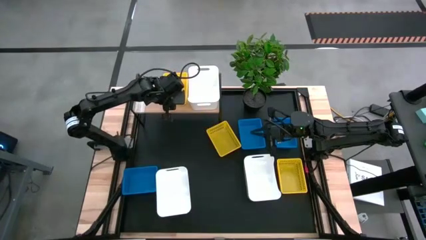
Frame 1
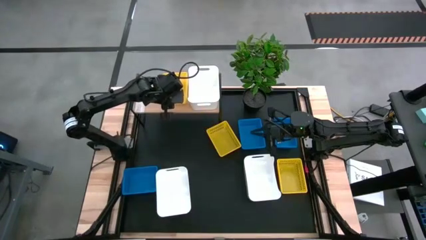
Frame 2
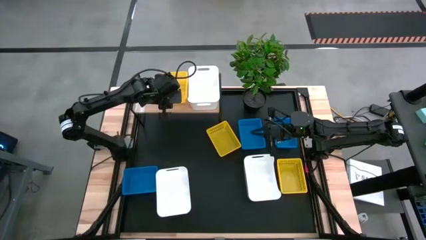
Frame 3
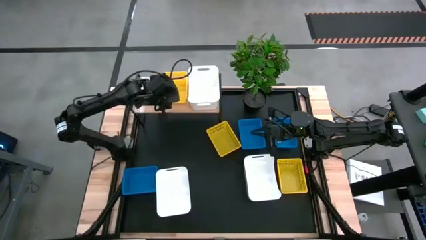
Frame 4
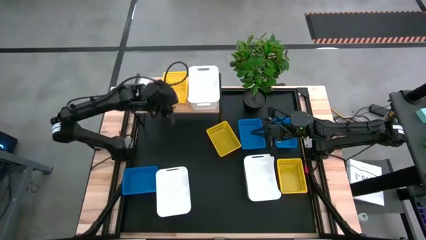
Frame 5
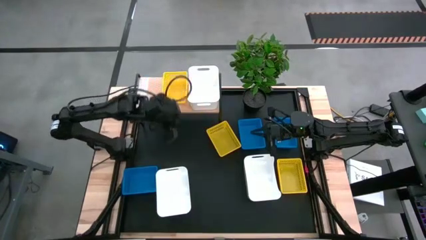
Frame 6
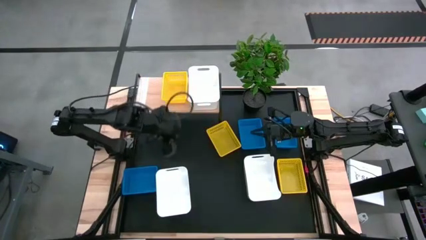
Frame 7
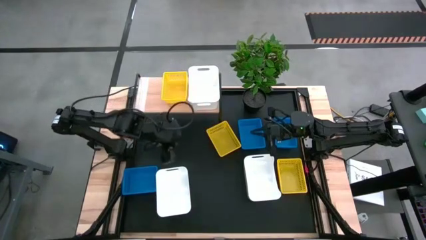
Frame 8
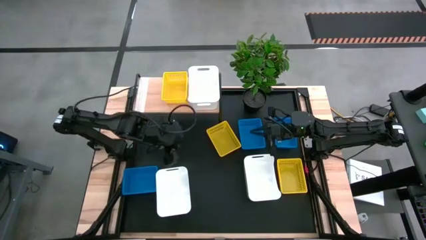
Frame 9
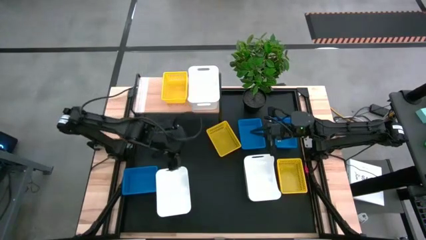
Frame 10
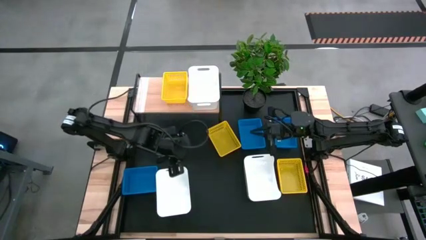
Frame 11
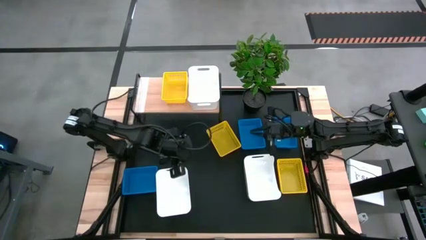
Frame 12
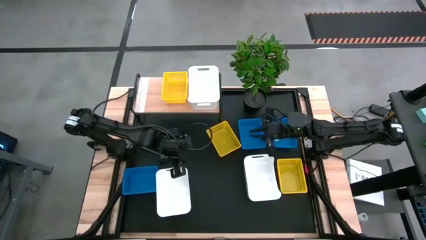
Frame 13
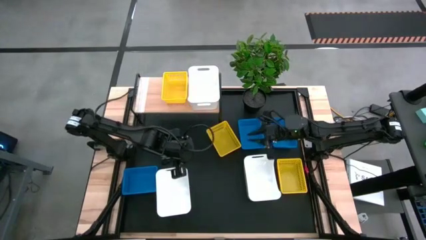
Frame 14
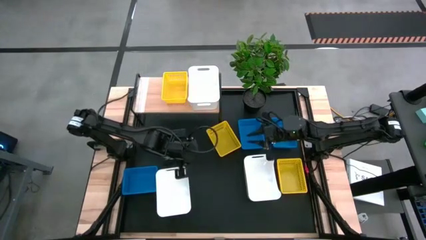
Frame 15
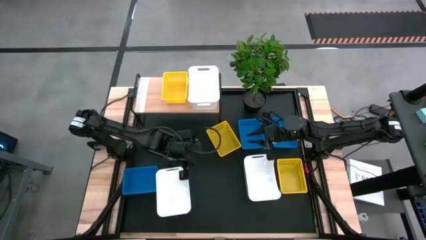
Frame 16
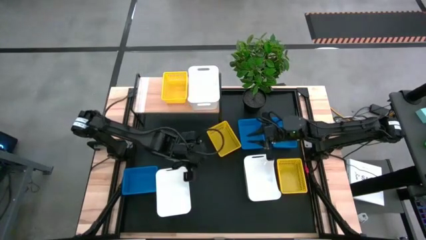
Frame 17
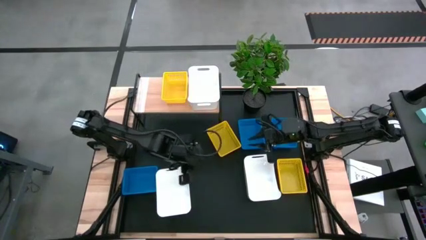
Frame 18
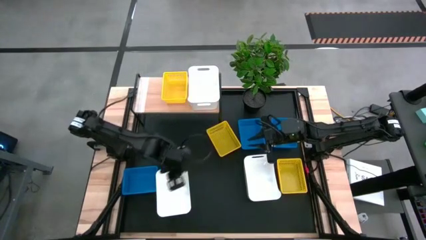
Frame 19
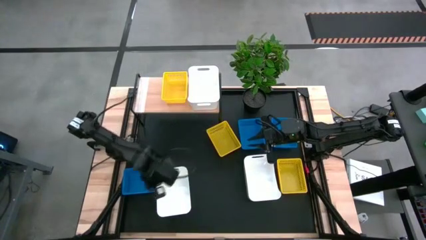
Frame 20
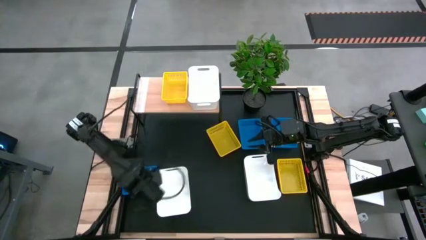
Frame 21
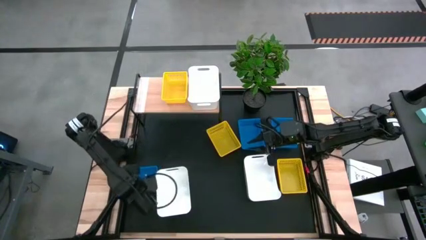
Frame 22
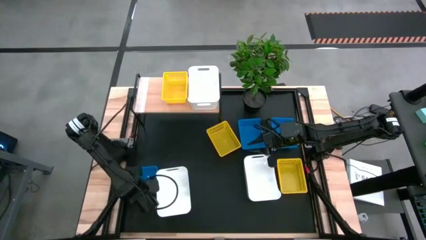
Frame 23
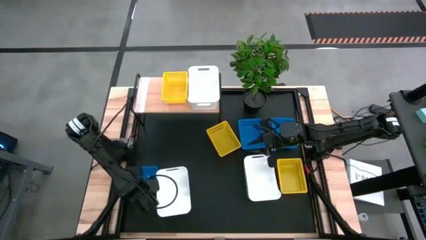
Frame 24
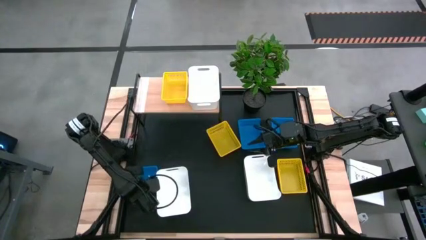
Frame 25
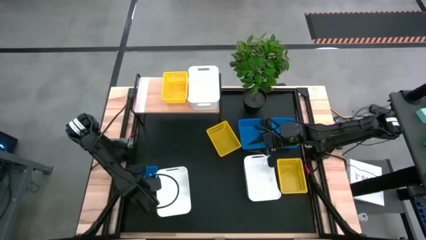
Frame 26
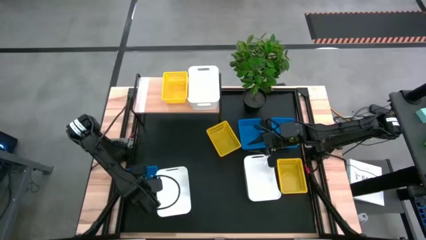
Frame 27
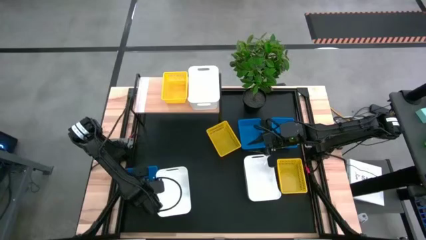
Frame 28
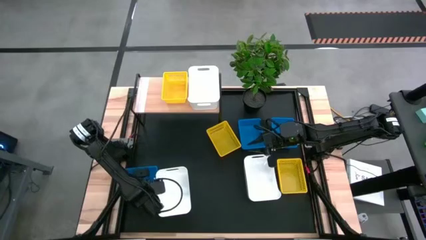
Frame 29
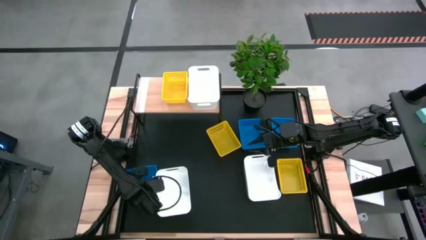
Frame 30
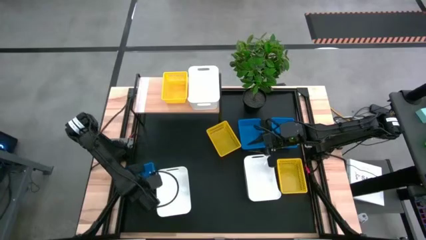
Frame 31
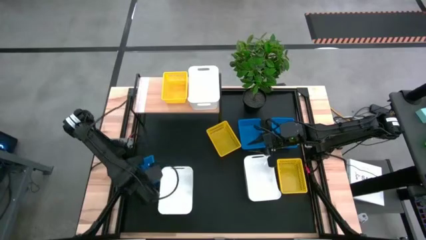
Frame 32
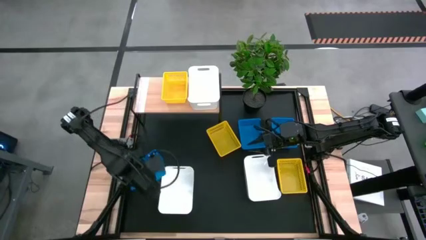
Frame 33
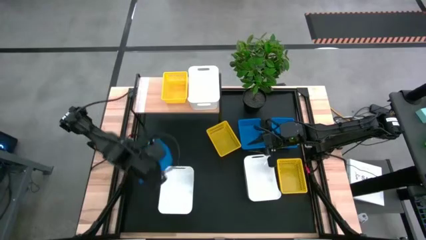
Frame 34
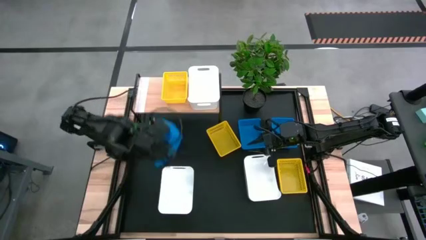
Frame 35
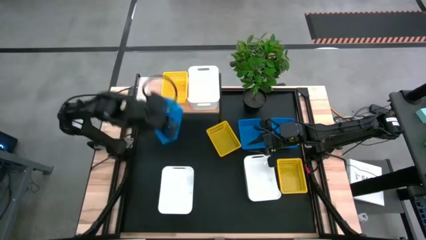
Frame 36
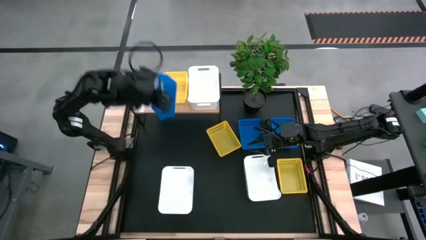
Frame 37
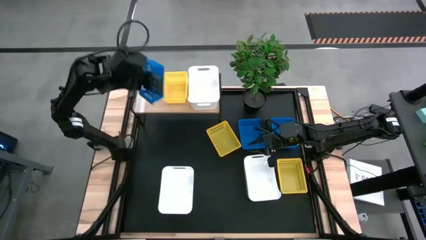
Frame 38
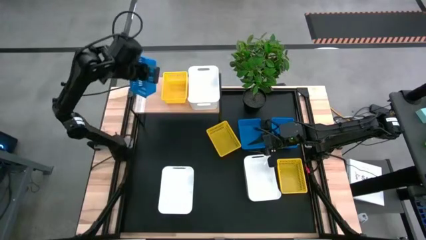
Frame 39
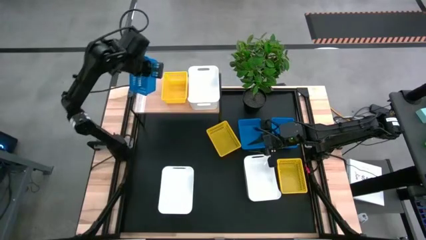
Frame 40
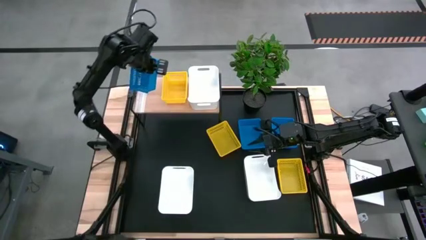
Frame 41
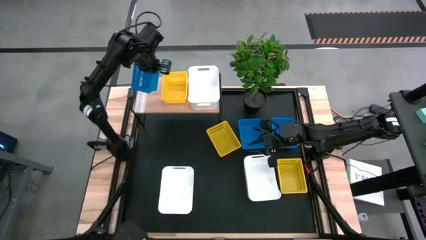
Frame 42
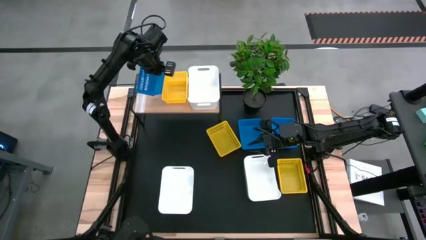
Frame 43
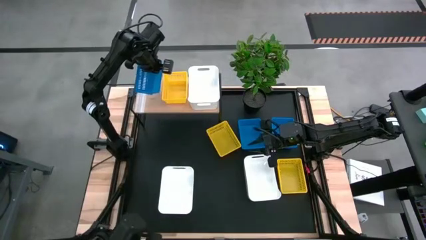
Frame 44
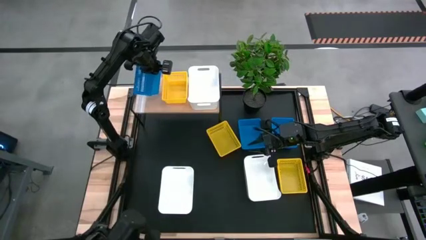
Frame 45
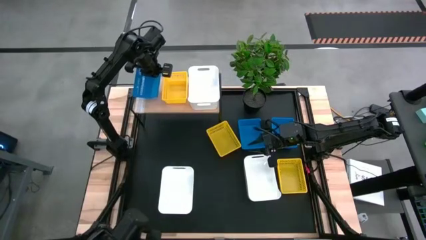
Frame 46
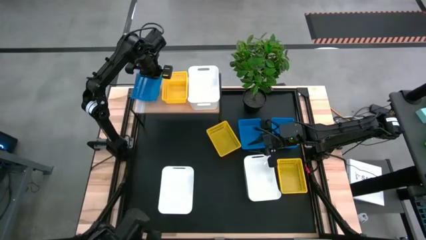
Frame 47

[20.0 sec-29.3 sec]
Task: Stack baskets on shelf by color
Put the bottom left blue bin on the shelf

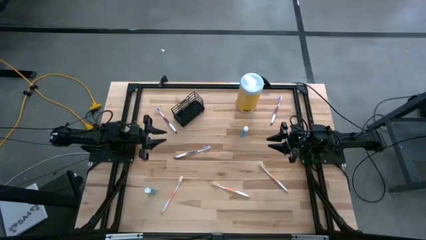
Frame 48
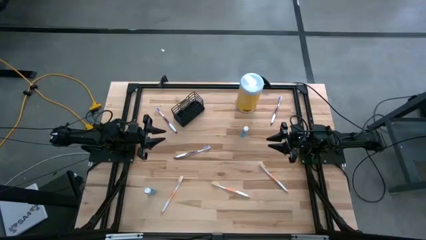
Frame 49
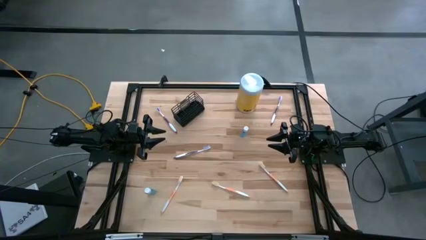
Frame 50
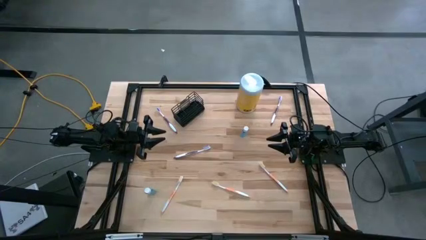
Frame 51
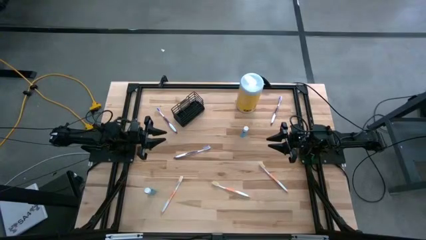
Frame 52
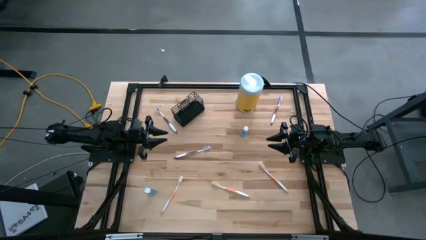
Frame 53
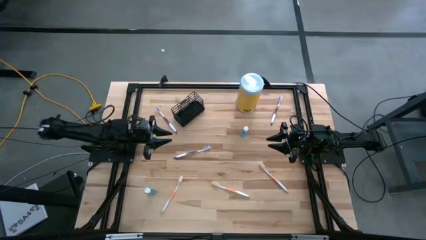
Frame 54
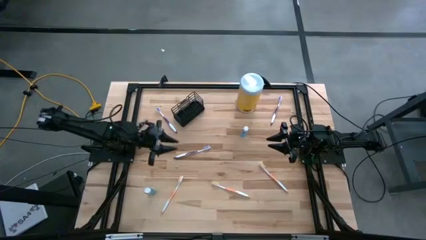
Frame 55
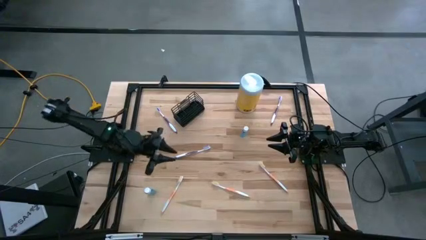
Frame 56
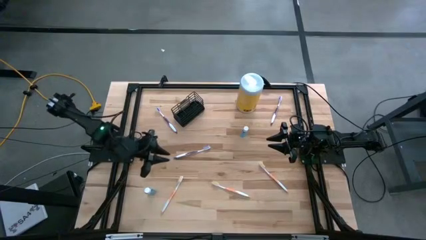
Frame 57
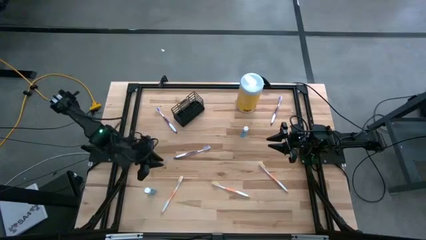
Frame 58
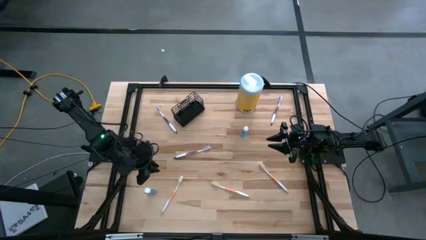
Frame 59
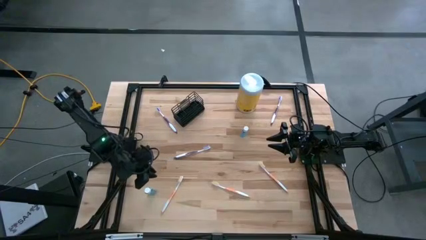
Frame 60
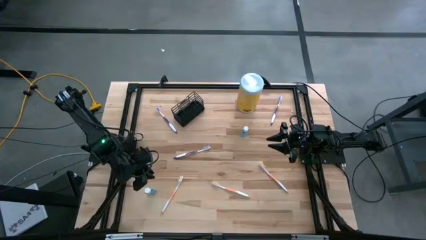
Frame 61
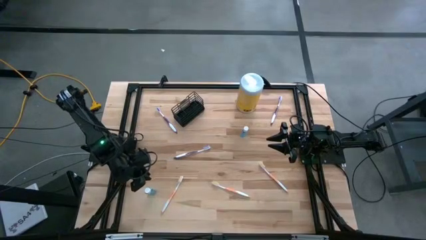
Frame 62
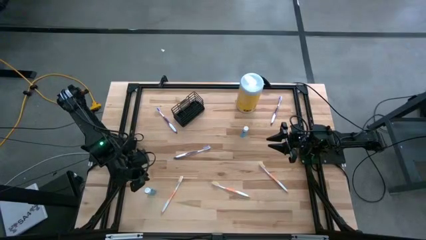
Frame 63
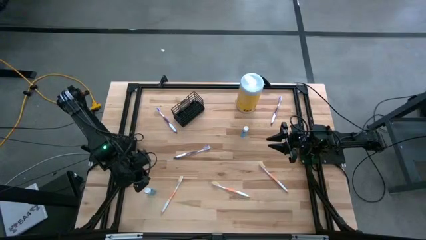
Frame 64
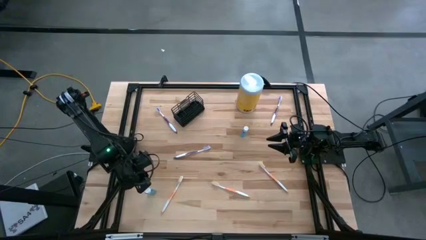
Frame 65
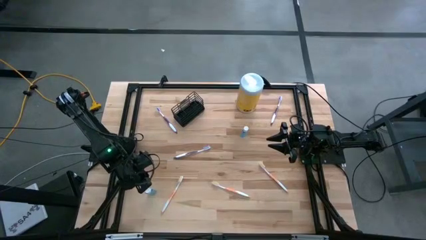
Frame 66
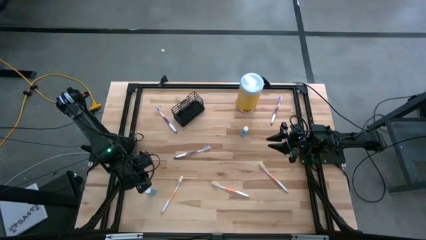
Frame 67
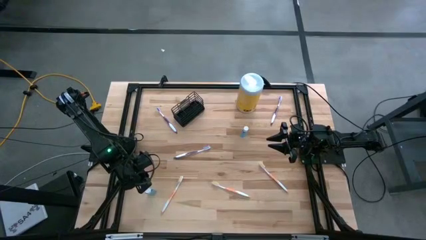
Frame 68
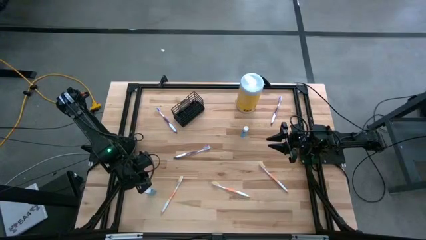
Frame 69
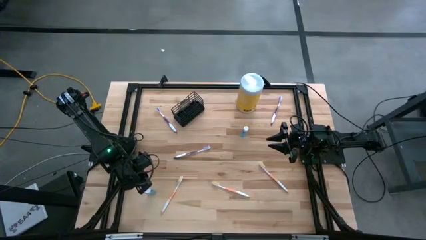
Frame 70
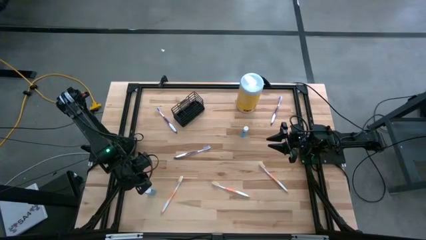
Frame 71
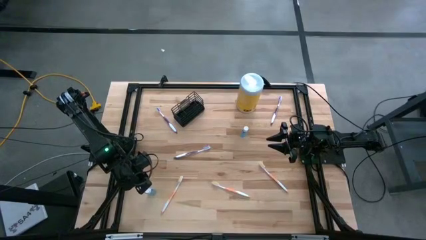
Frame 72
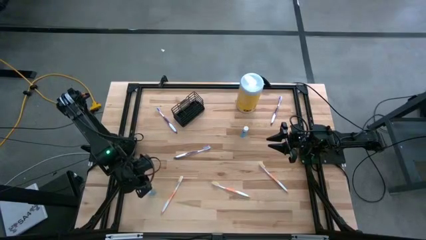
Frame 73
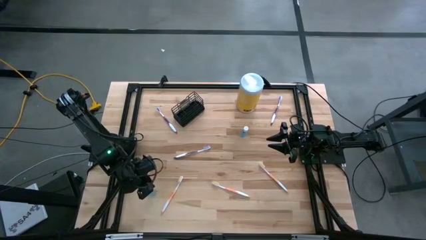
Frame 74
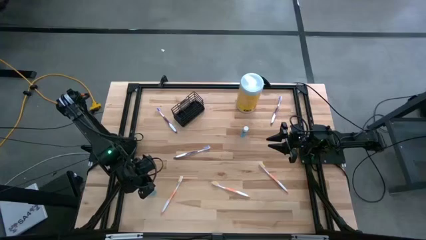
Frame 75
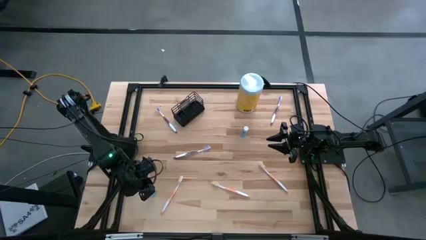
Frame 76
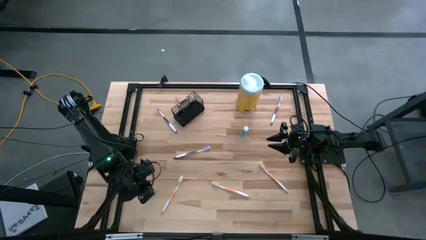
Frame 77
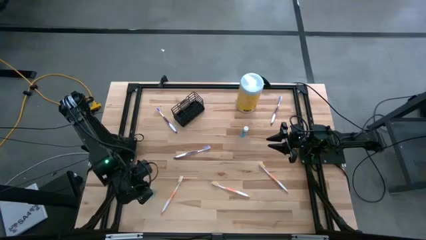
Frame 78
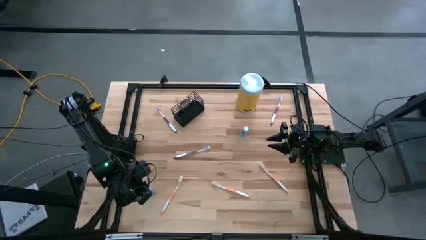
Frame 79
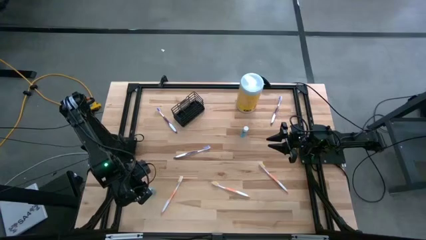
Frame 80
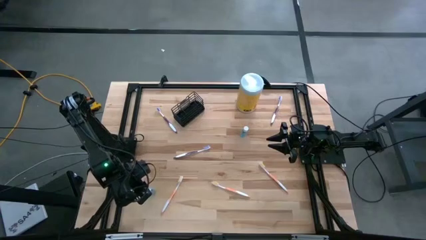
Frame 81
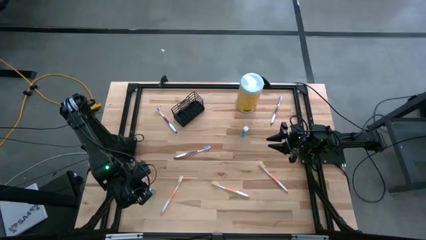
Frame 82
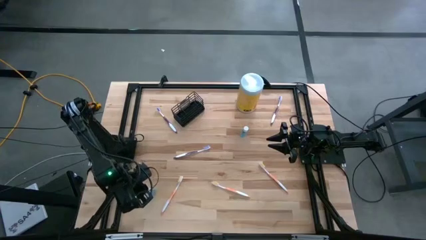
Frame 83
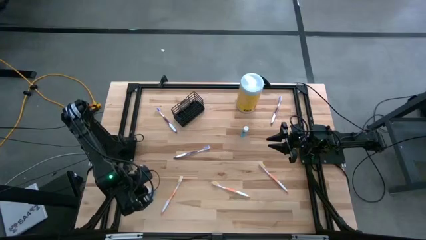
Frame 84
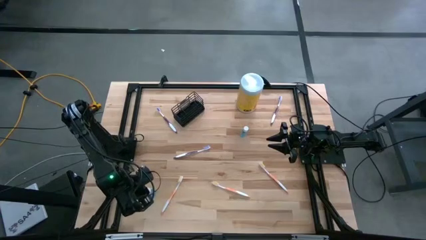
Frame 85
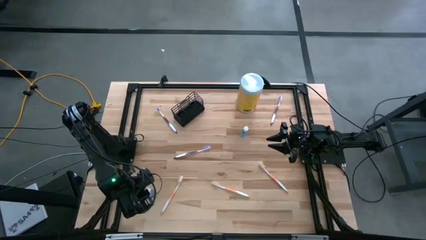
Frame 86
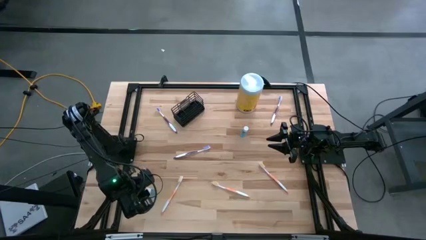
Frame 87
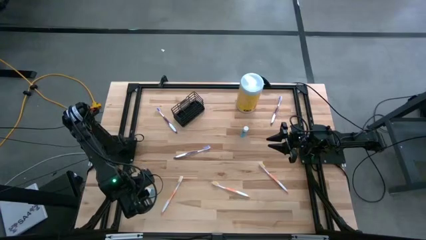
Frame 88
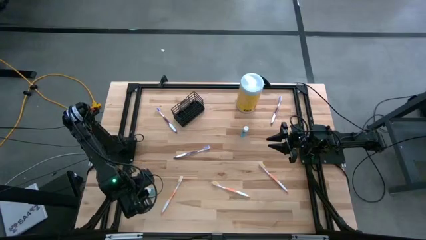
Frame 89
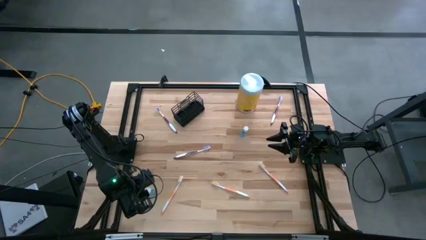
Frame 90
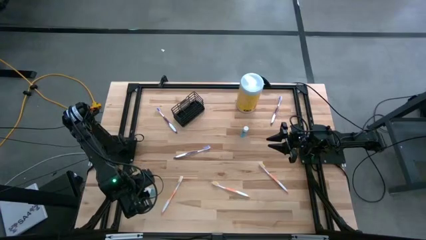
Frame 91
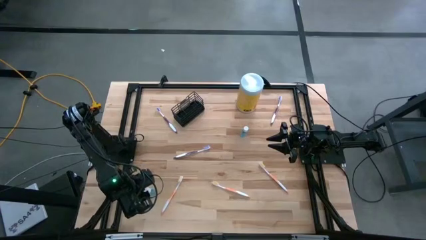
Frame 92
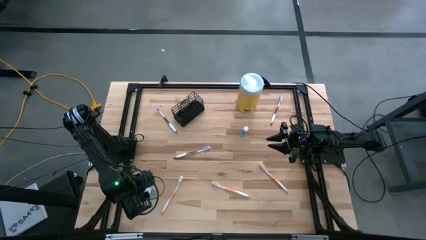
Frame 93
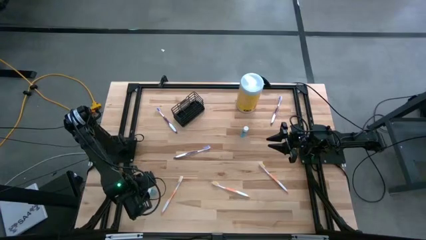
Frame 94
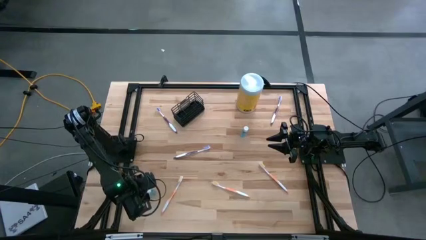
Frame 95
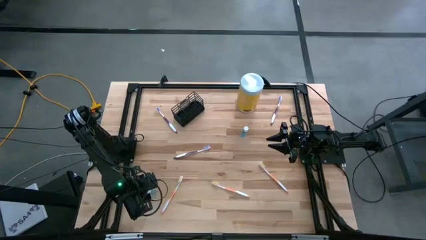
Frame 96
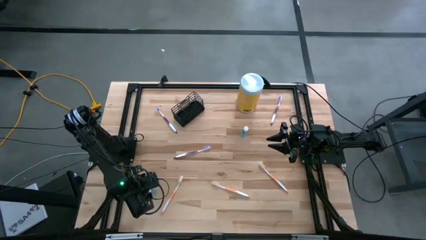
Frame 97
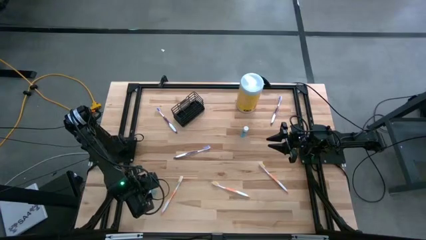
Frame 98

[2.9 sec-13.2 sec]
Task: Pick & Place toothbrushing station
Put the left mouthwash into the middle section of the wire organizer
